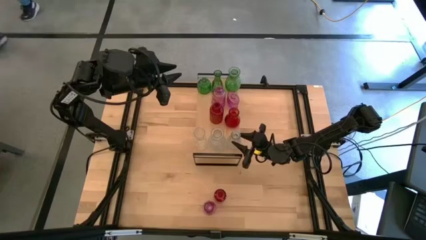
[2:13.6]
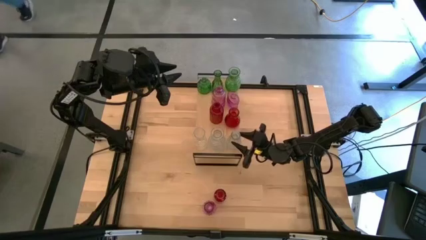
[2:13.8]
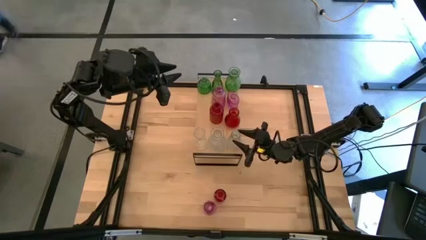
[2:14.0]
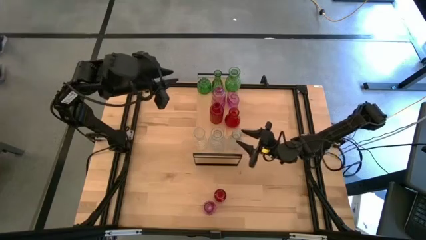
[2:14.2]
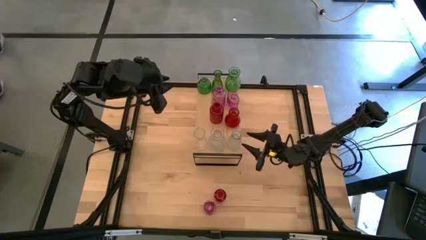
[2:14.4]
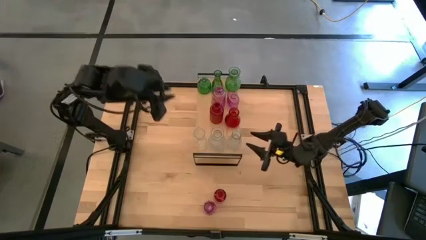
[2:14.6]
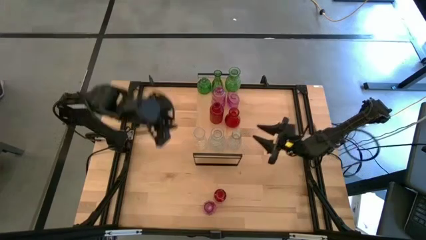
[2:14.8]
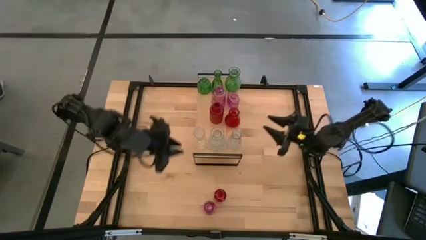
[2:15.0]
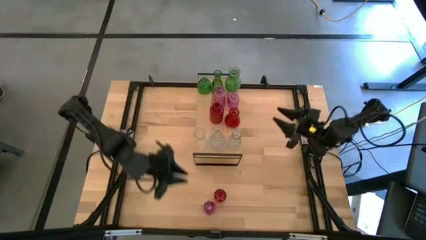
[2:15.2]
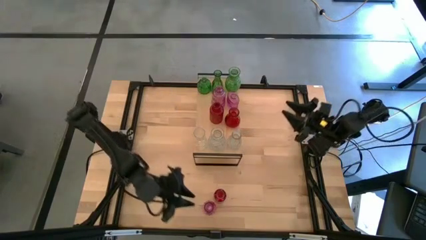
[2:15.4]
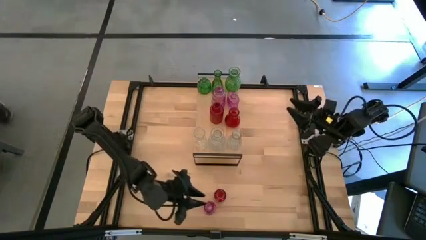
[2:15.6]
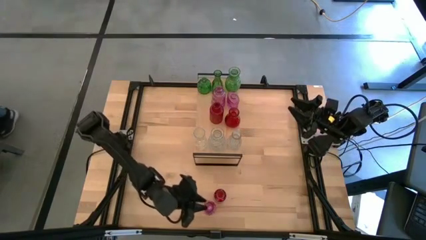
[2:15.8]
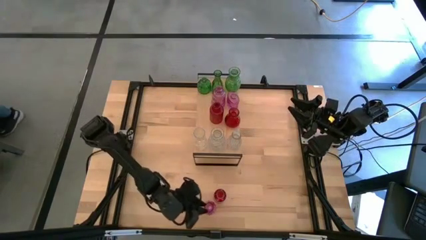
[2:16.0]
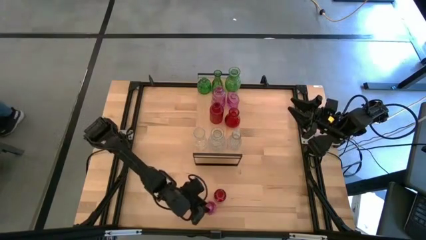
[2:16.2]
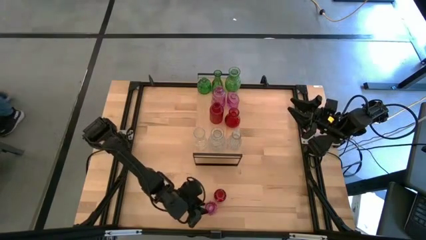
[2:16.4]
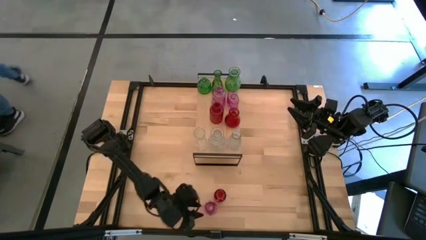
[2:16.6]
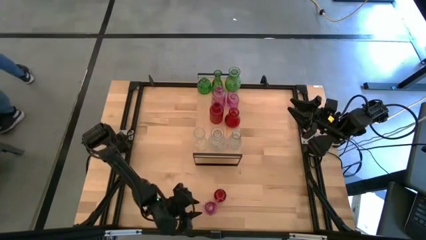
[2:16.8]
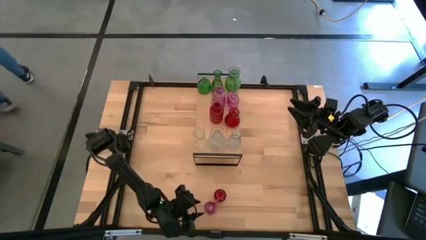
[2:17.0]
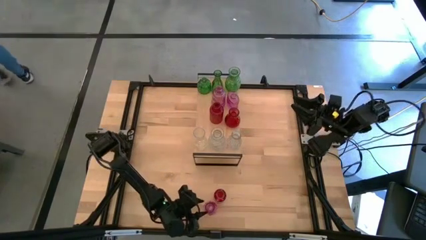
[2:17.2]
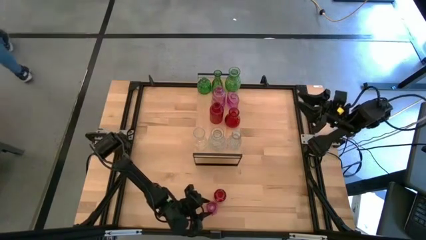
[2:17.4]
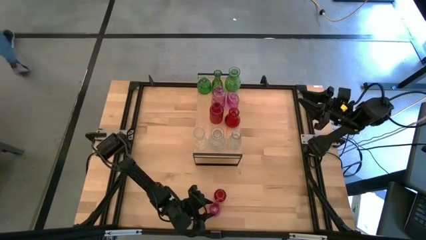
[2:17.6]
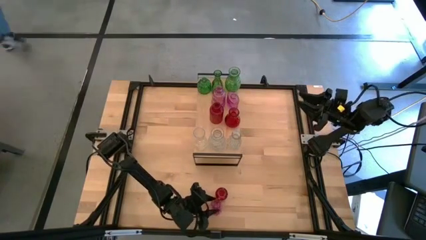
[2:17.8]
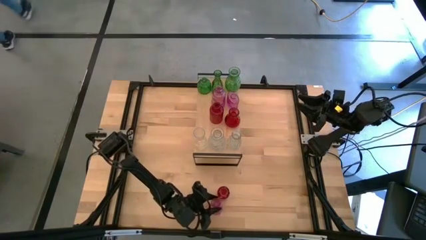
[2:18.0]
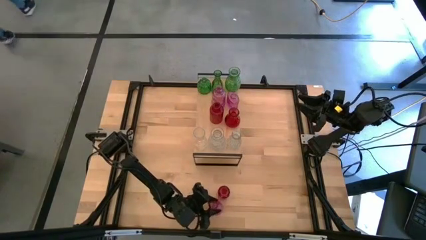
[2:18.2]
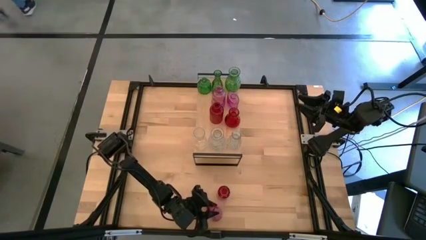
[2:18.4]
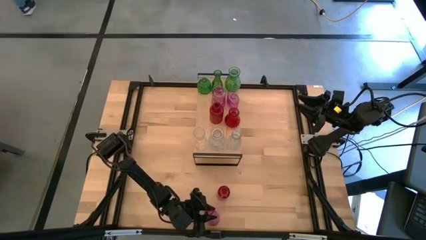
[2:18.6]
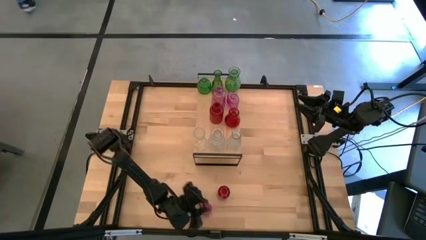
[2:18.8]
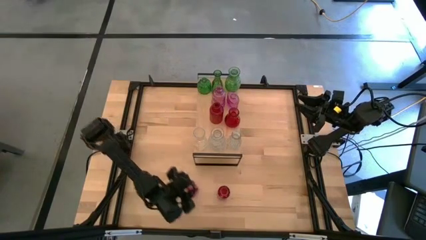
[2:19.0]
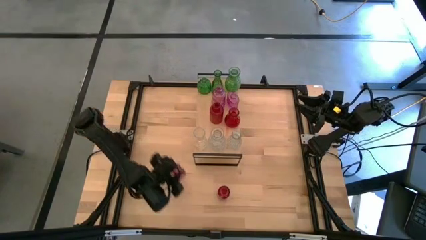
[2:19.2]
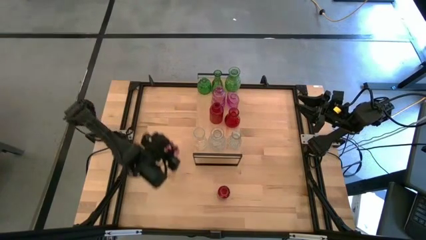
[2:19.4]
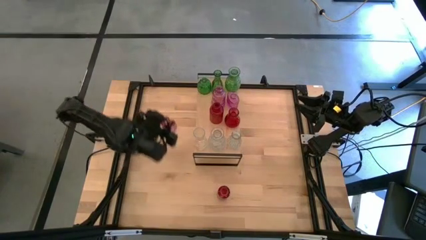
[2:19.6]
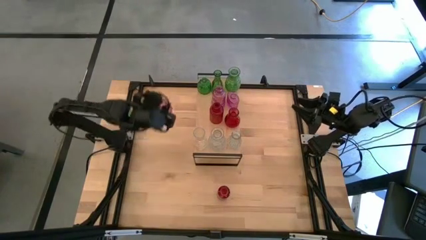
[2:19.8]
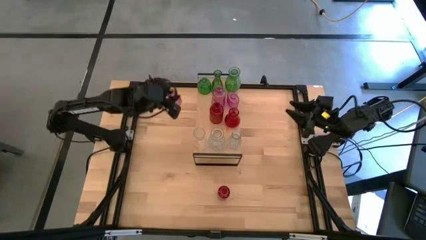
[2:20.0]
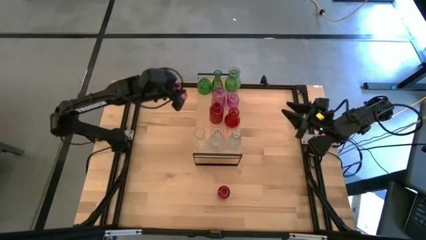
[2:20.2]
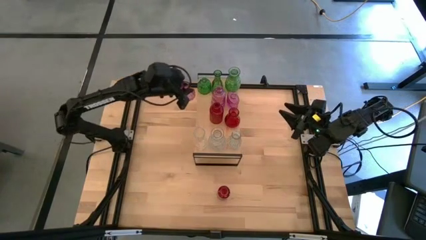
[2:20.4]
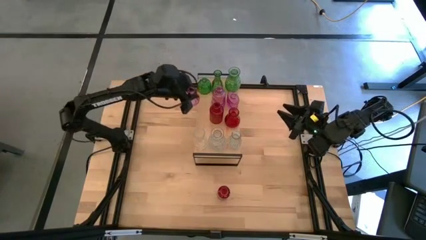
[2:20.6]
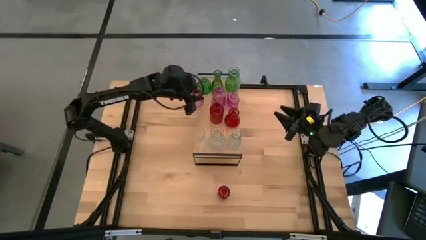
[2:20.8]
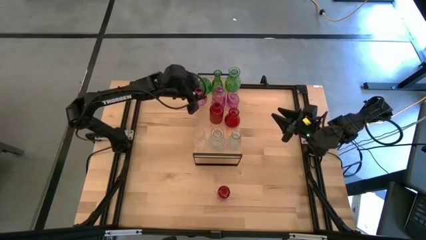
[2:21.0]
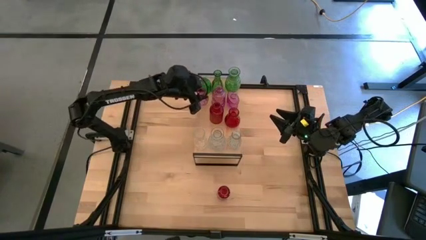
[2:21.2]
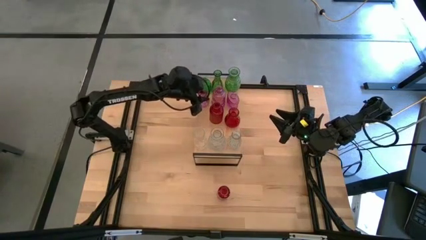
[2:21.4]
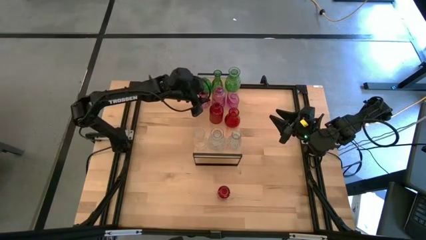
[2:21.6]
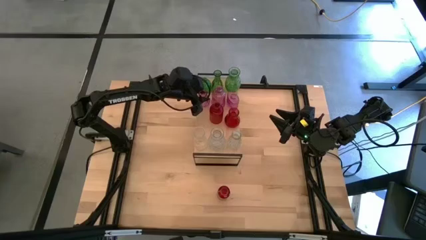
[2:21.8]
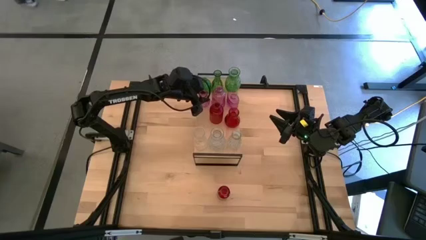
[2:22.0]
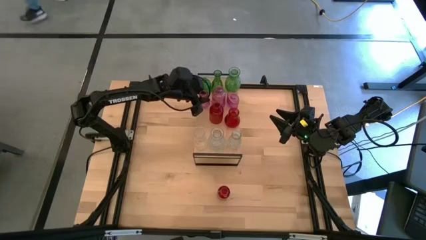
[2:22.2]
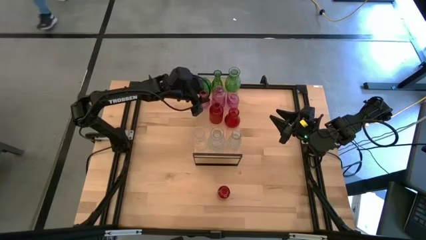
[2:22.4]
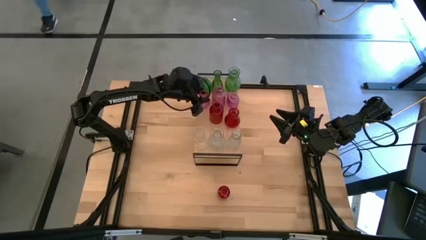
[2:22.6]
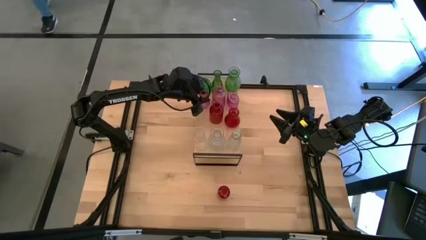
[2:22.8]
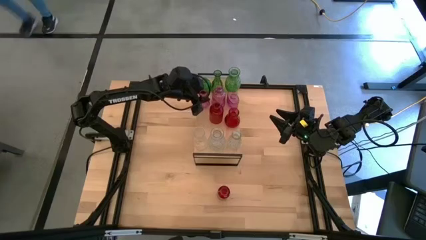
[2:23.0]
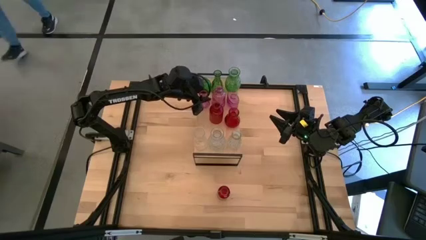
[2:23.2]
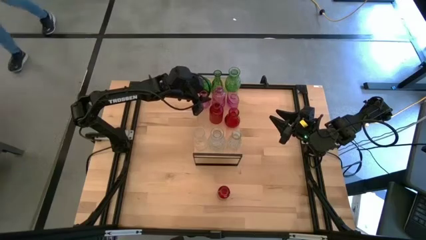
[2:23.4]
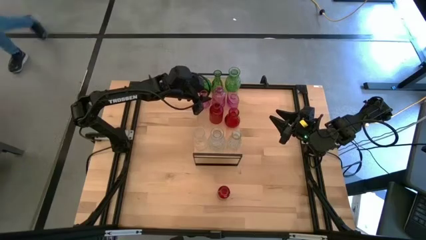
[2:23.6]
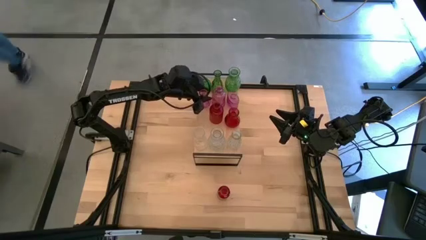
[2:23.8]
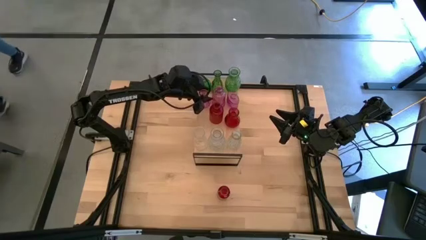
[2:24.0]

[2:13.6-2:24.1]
Task: sort vases onto shelf
Put the pink vase on the shelf aligned with the other pink vases

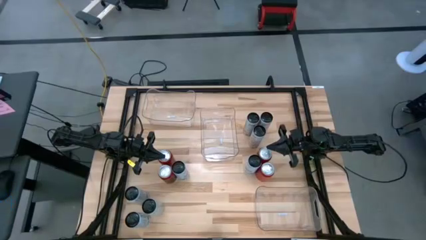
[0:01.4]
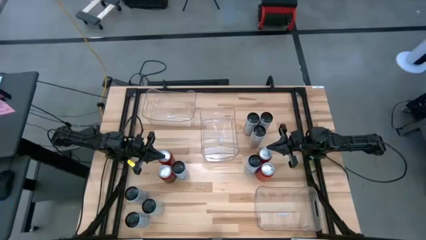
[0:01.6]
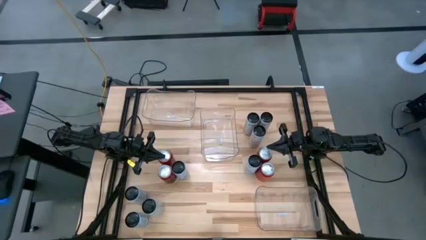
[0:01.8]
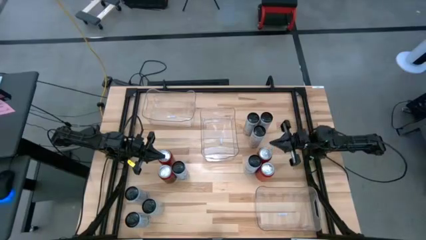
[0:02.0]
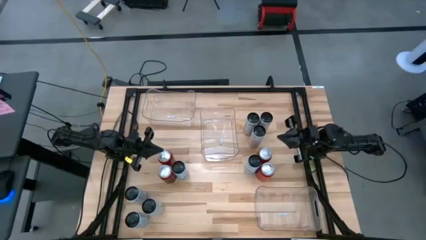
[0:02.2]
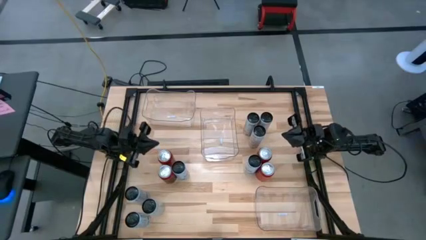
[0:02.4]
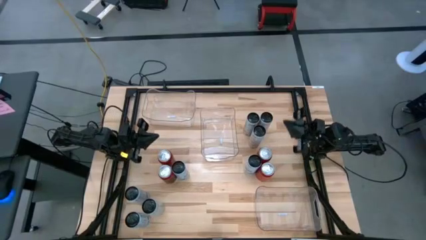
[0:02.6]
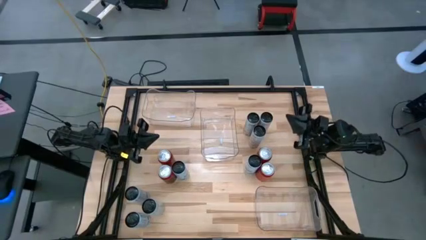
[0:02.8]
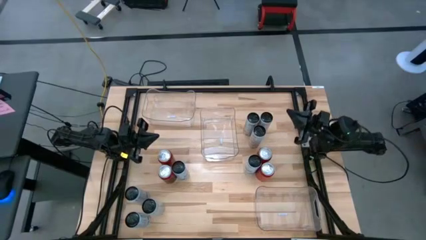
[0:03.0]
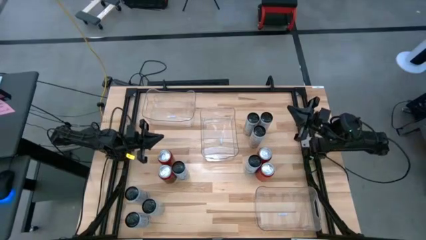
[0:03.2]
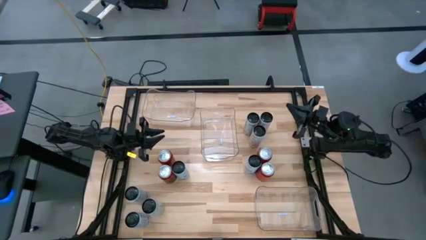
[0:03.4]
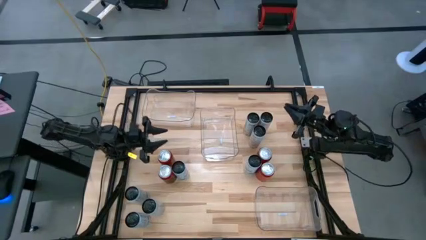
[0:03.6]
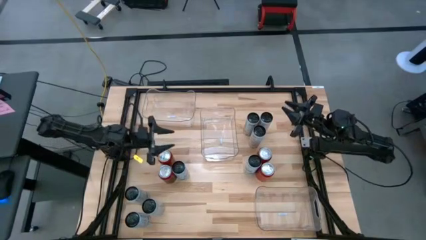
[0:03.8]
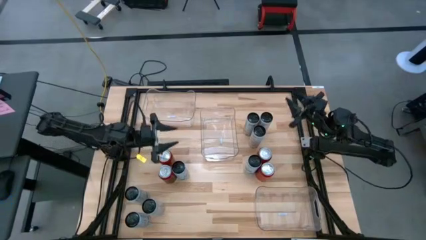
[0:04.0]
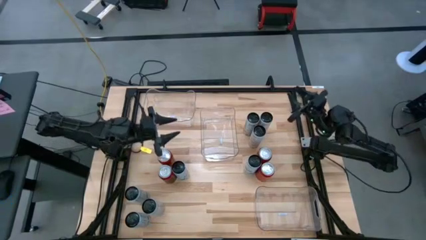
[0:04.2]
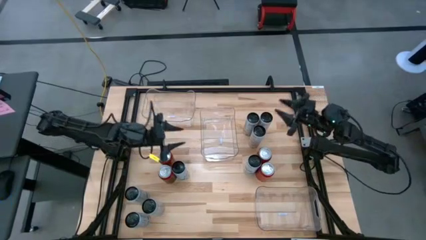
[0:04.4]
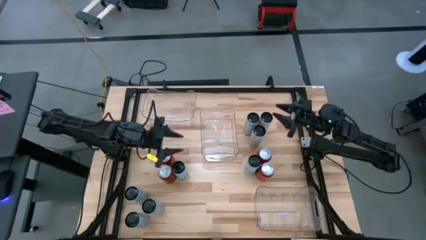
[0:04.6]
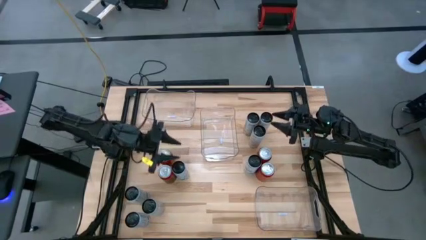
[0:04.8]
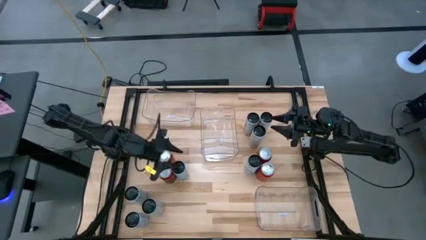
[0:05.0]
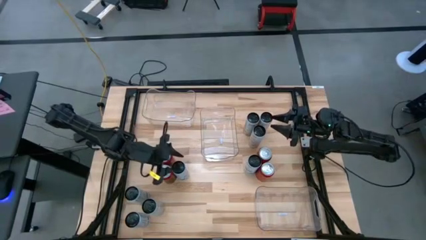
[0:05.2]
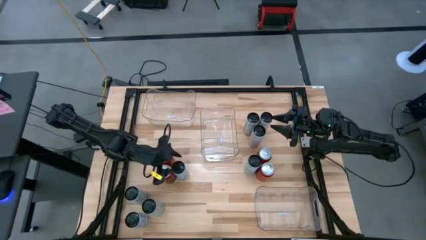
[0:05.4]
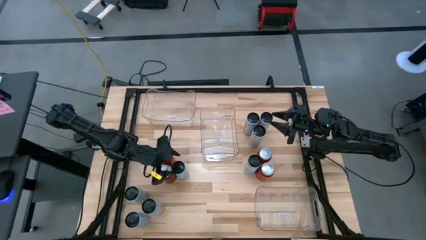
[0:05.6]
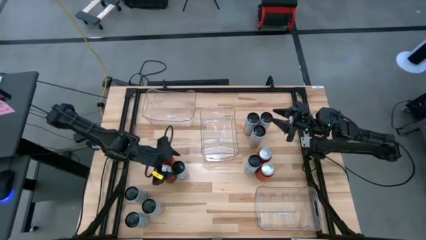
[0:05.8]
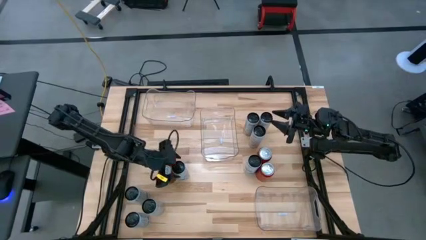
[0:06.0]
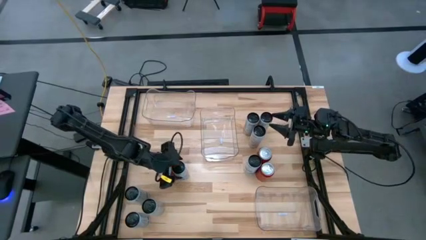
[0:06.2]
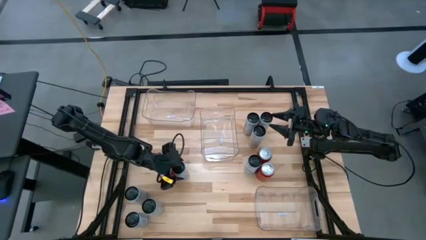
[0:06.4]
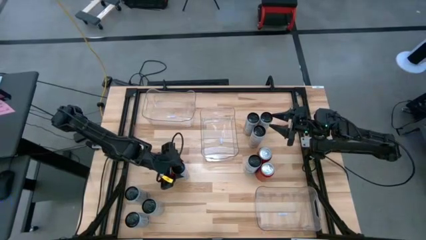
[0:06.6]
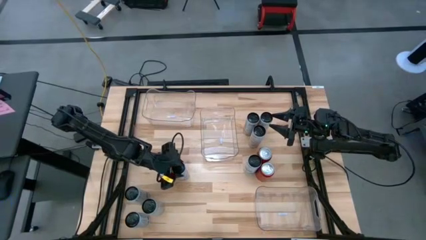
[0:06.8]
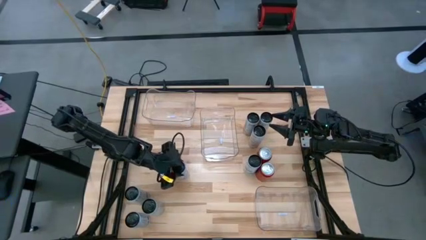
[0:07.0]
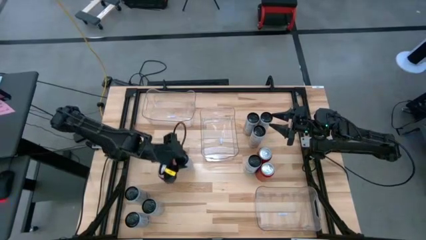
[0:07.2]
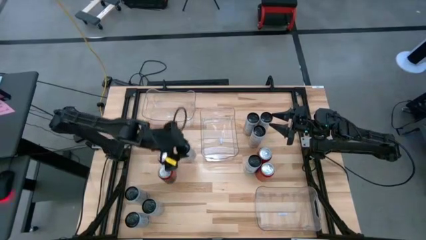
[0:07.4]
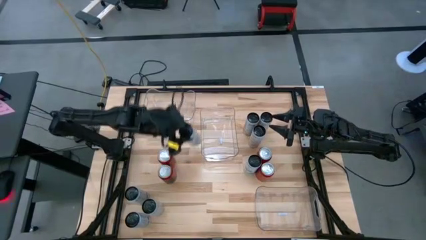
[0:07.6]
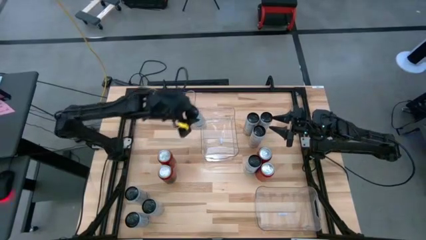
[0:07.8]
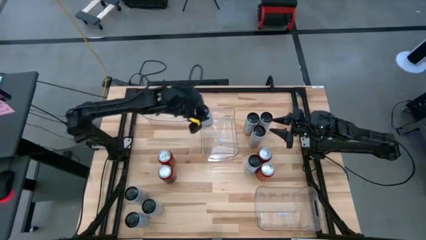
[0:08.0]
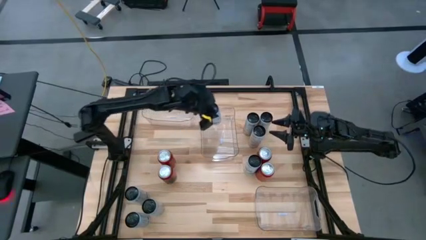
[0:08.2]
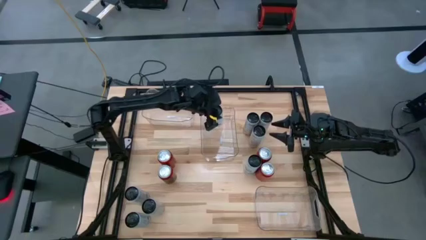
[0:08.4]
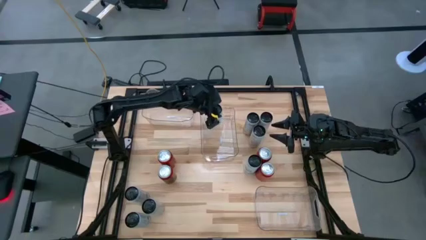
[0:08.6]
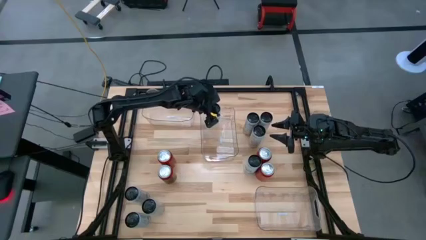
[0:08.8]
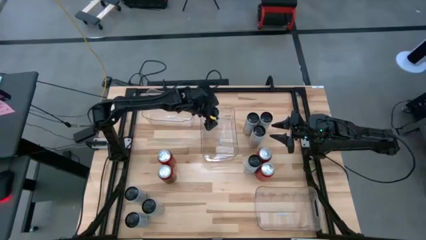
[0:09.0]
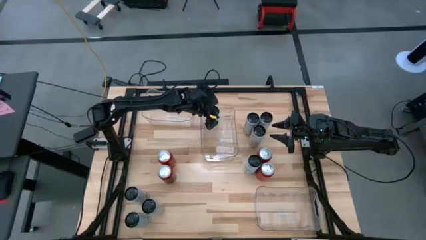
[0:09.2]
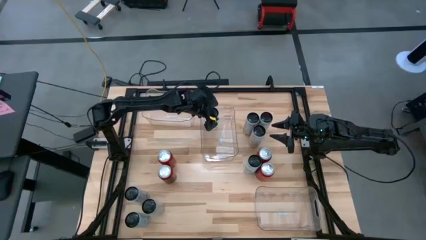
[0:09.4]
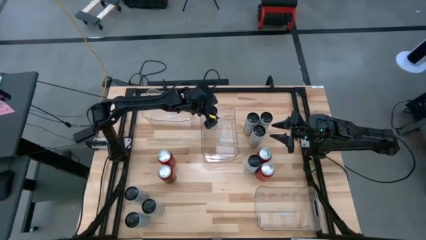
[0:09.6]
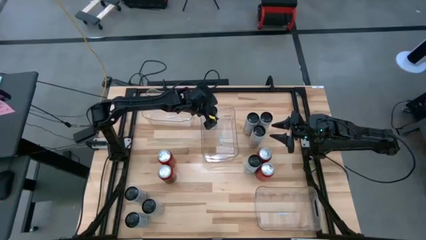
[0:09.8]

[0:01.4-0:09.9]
Task: Sort soda cans
Put the white blue soda can into the middle transparent bin
